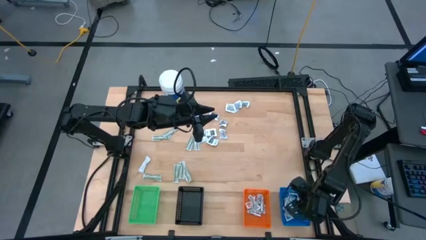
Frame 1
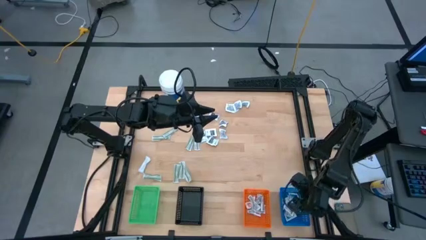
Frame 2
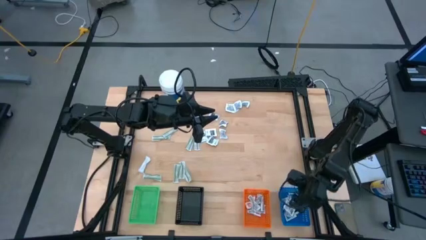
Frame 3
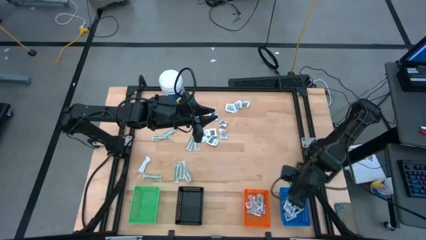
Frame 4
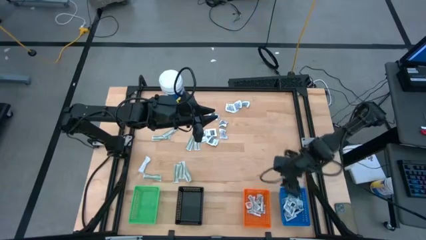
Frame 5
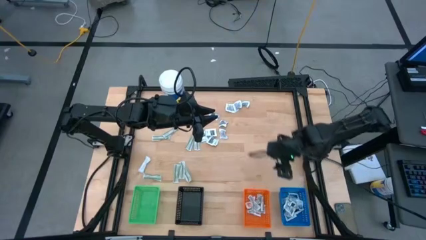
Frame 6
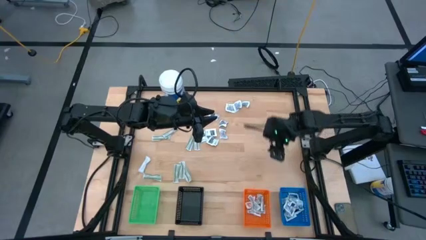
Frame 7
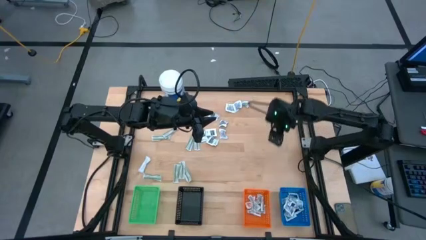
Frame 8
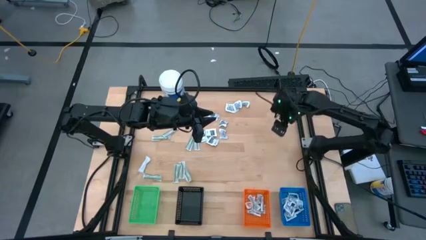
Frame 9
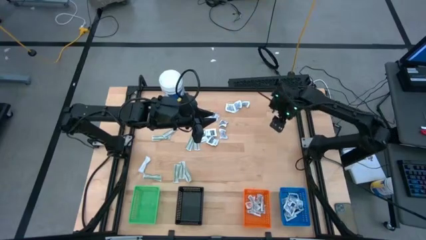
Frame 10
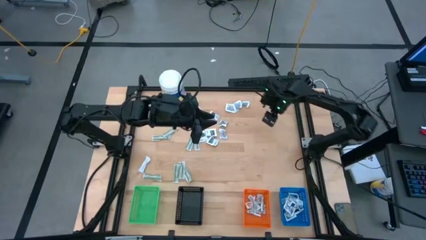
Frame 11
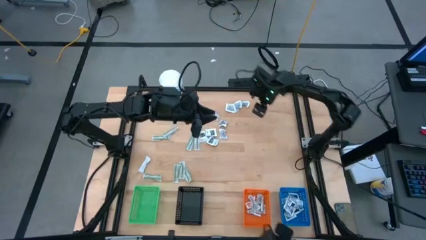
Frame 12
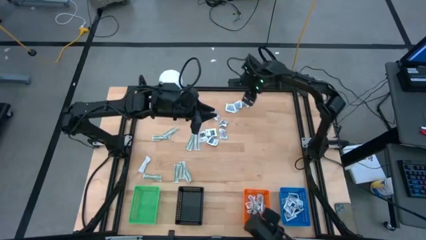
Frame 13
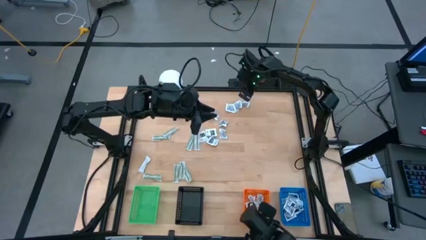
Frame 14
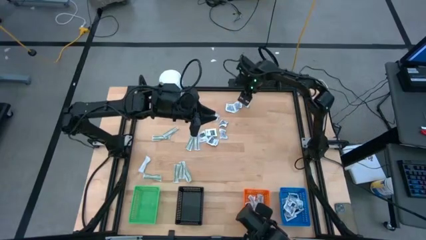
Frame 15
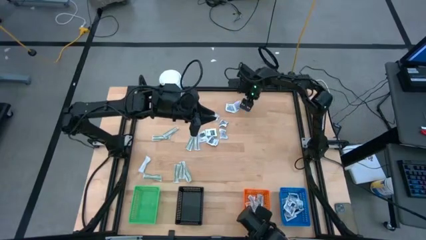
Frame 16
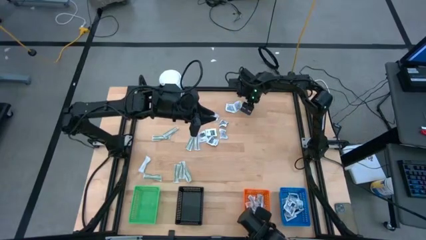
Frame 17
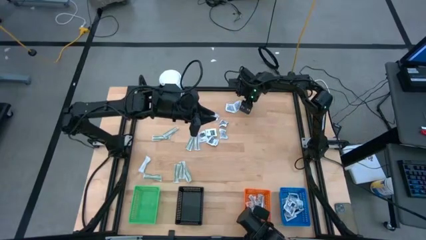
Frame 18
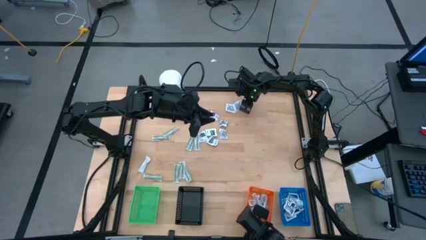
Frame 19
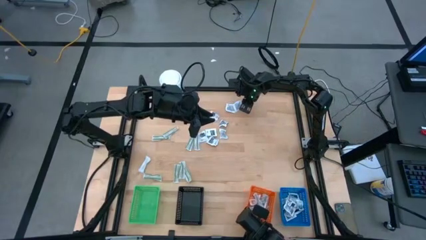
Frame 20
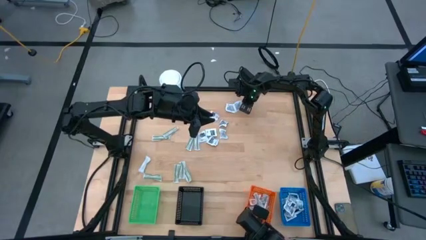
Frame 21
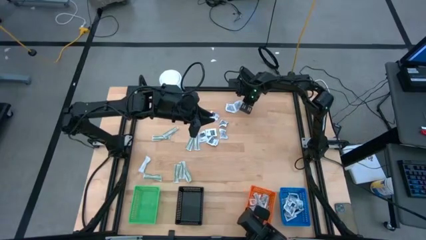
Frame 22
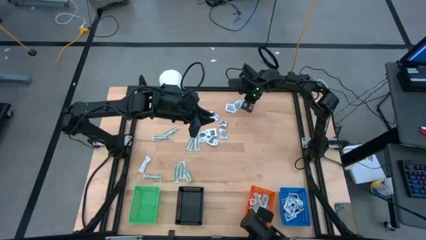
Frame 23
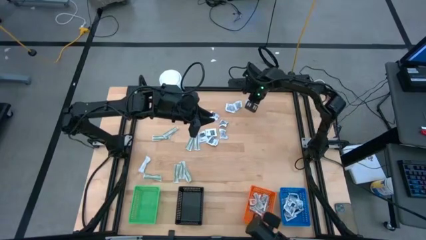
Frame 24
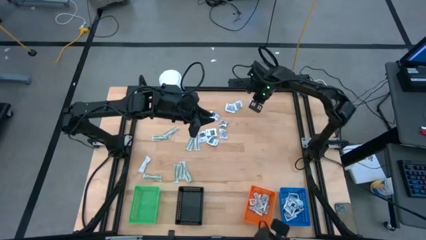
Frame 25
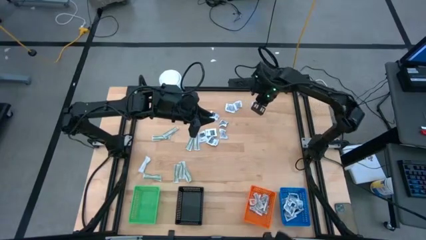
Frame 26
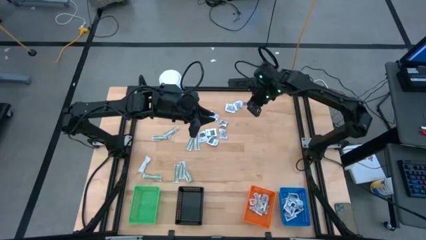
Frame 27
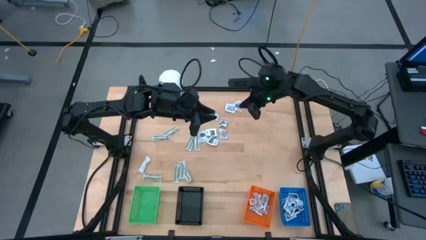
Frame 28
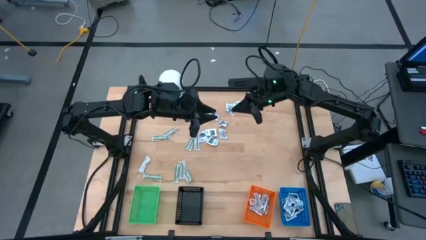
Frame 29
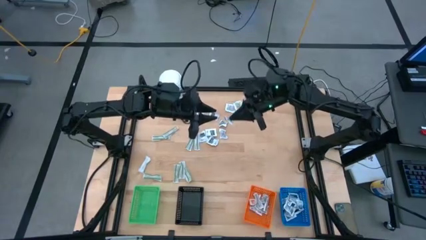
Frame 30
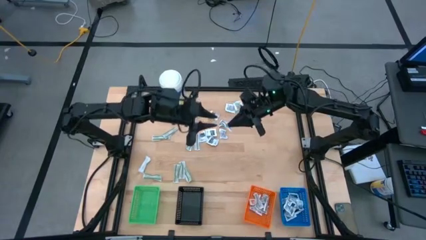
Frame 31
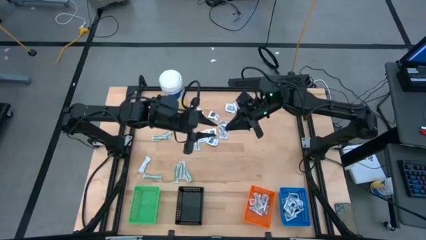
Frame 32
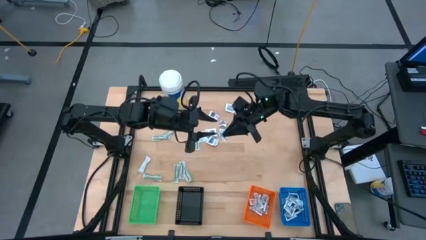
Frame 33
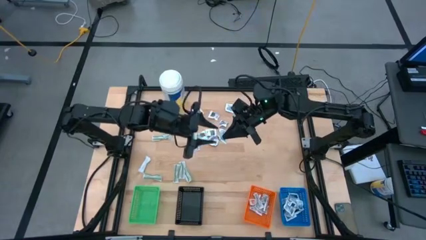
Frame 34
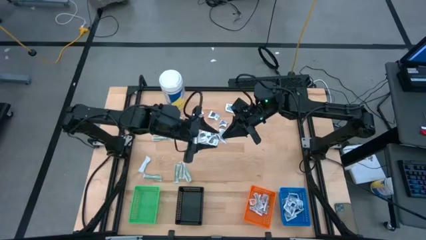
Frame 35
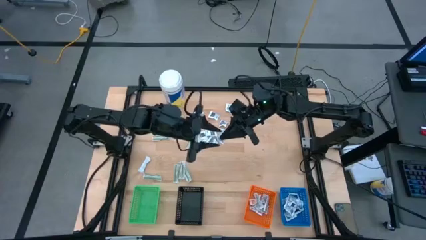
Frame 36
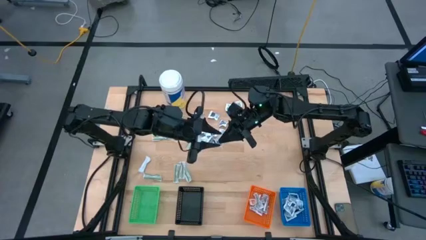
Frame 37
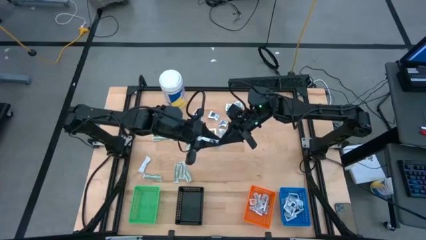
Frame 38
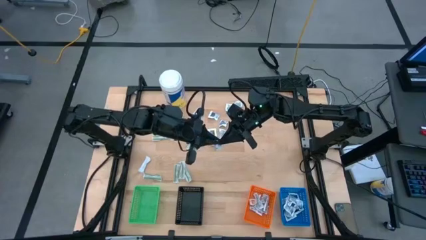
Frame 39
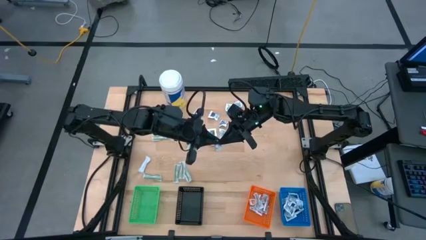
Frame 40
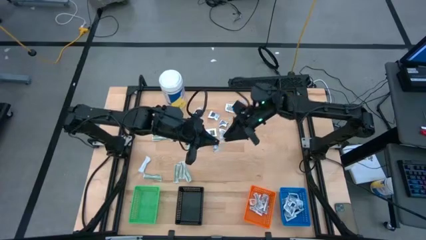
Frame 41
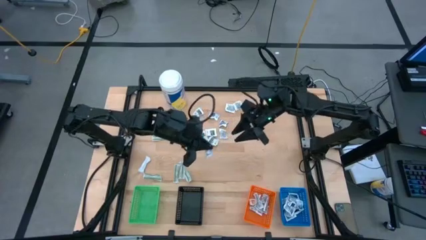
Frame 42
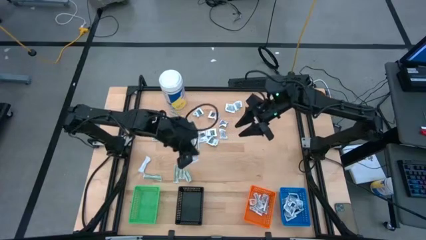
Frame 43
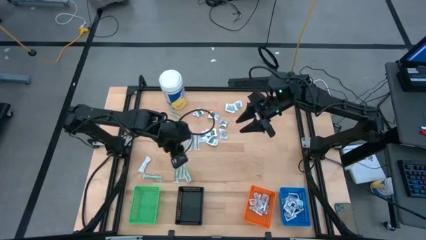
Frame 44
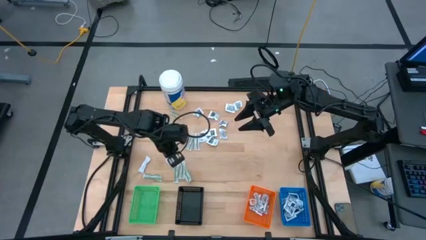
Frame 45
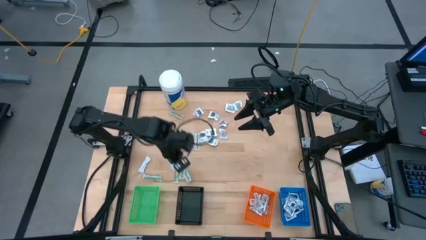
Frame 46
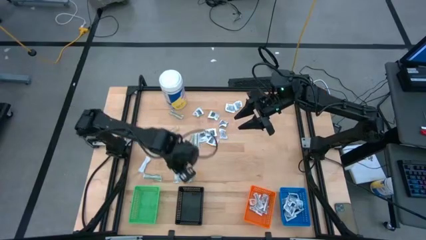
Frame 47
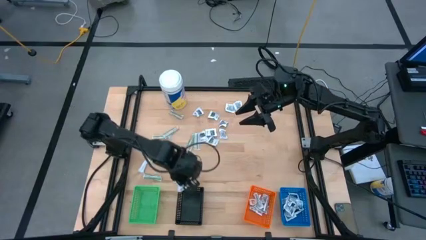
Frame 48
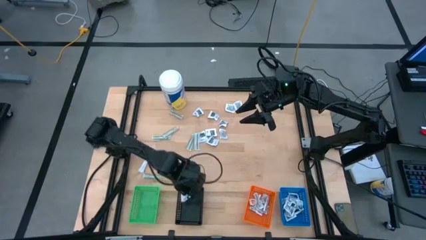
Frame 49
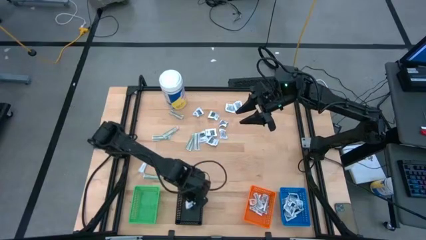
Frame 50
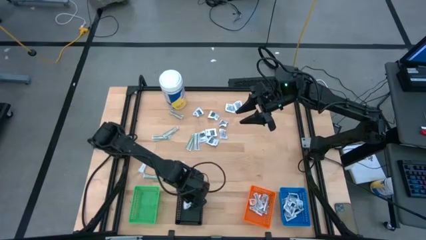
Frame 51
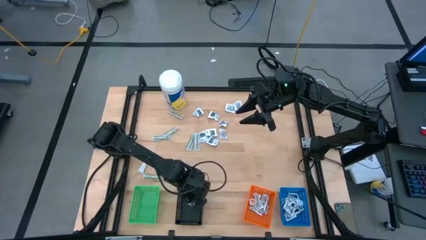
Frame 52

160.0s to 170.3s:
Task: Pick & Place First Aid Supplies
Put the towelette pack into the black bin

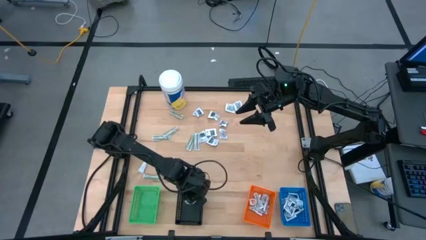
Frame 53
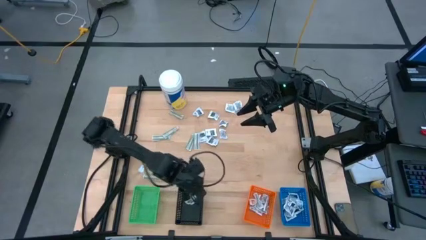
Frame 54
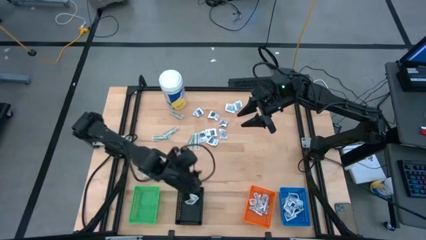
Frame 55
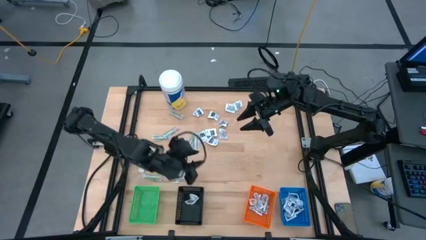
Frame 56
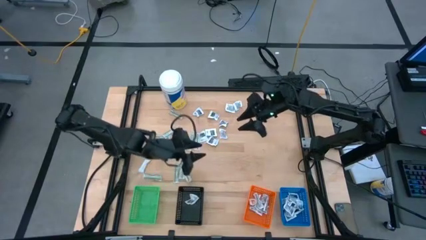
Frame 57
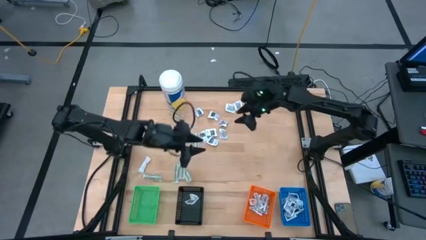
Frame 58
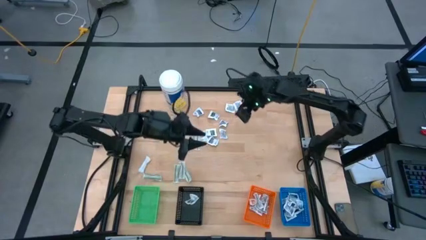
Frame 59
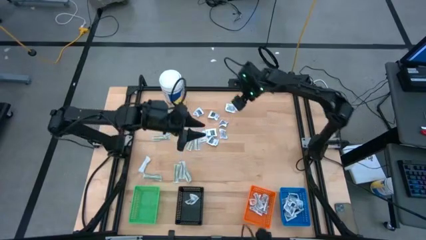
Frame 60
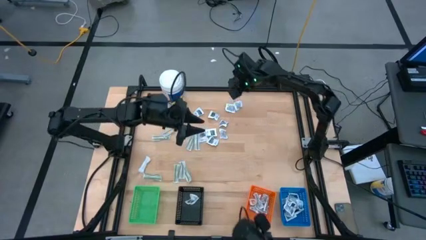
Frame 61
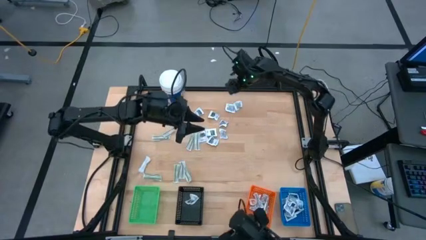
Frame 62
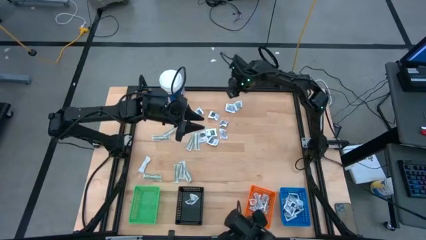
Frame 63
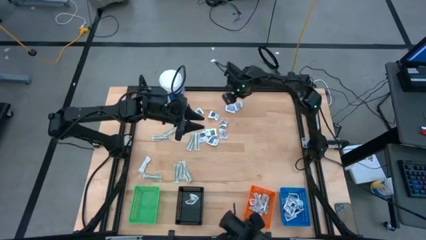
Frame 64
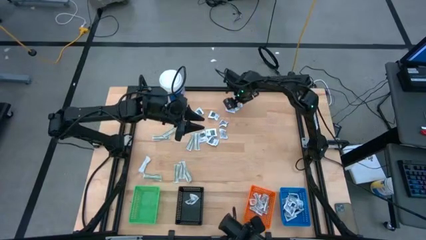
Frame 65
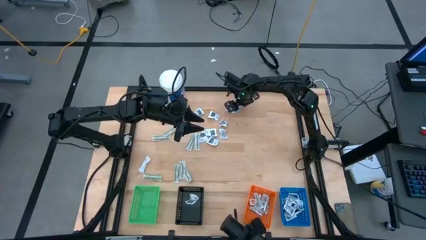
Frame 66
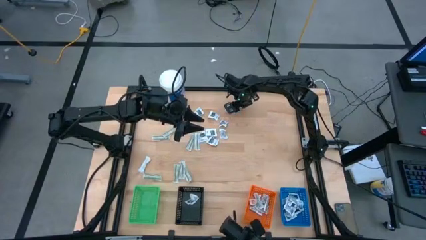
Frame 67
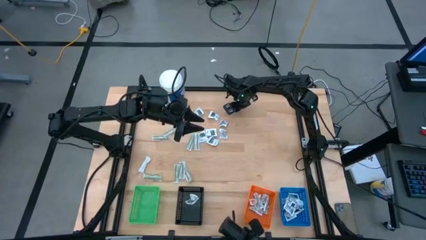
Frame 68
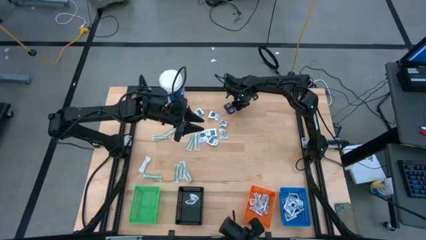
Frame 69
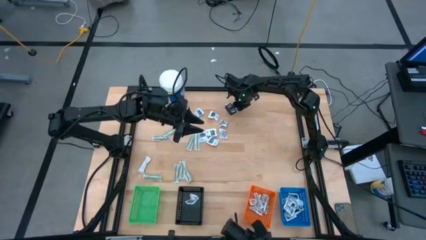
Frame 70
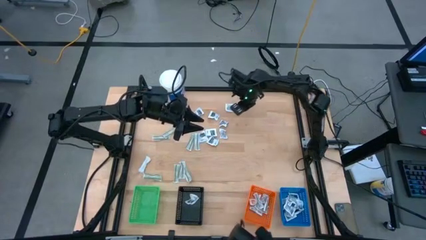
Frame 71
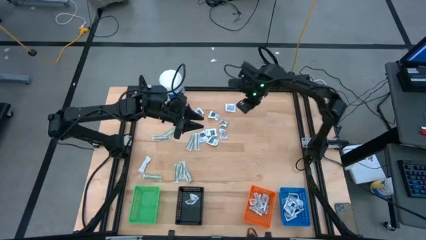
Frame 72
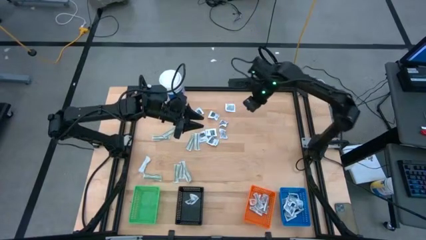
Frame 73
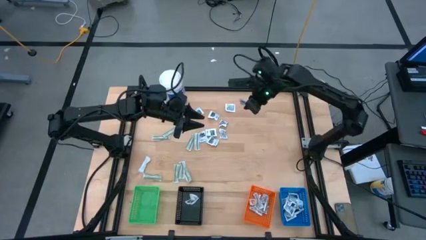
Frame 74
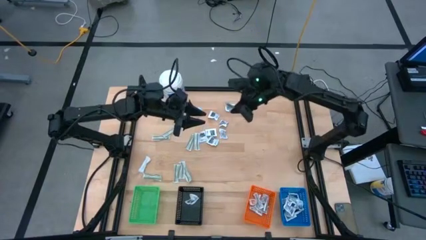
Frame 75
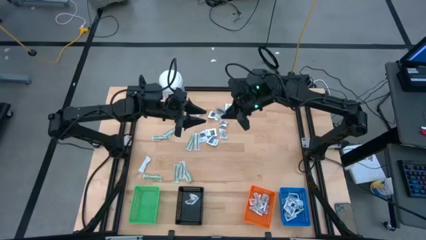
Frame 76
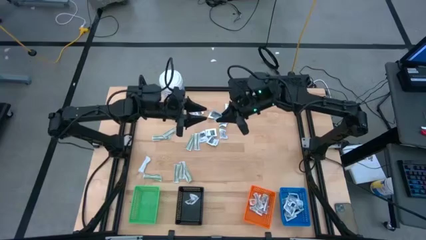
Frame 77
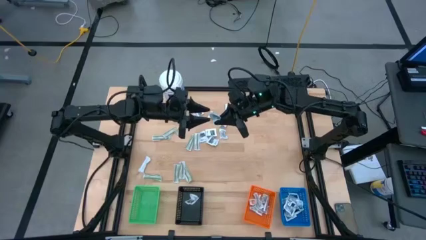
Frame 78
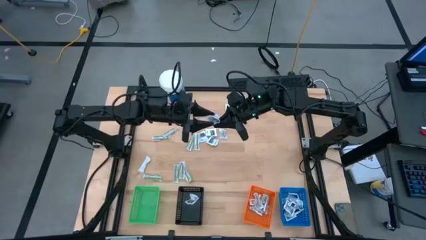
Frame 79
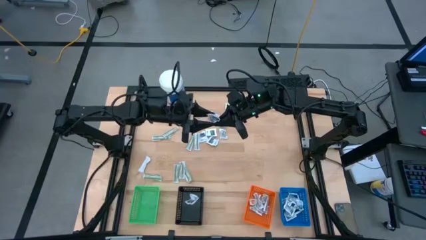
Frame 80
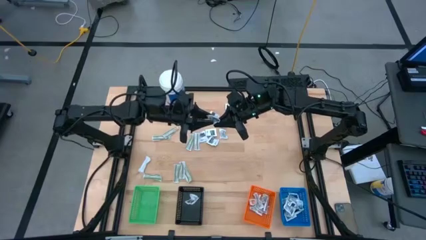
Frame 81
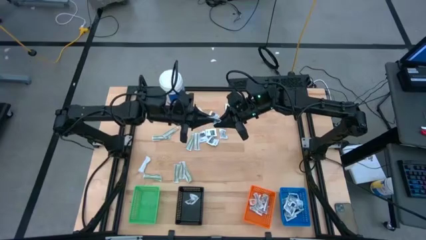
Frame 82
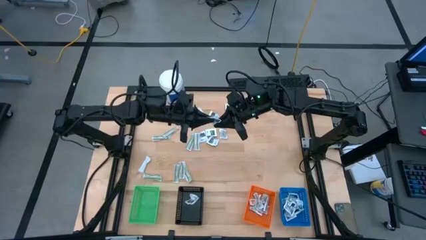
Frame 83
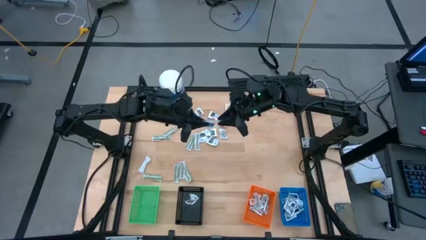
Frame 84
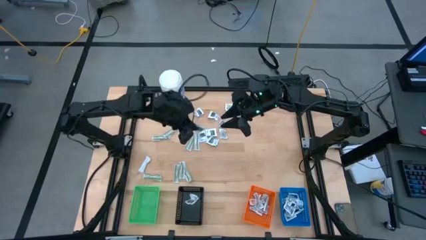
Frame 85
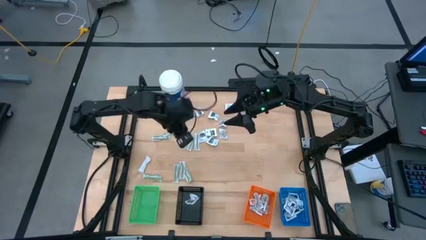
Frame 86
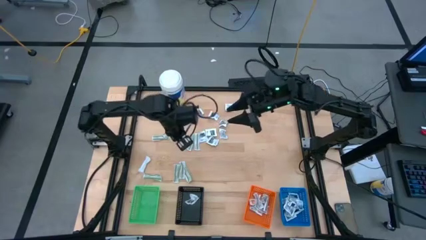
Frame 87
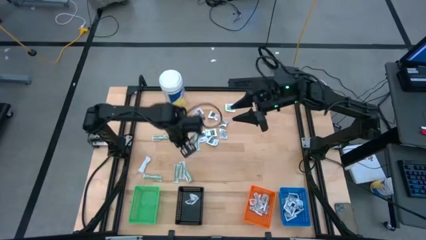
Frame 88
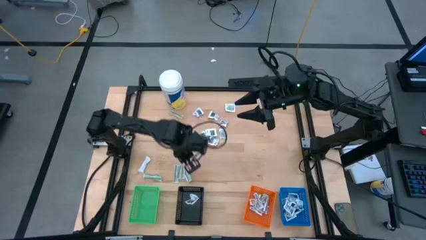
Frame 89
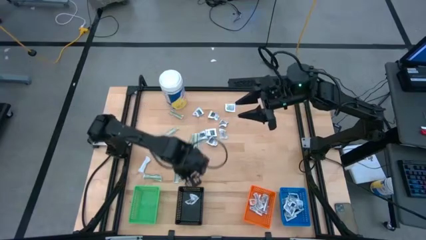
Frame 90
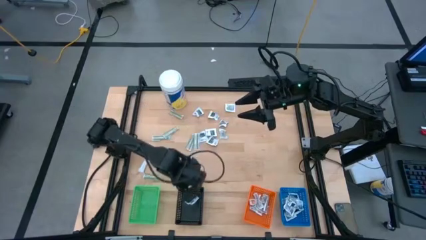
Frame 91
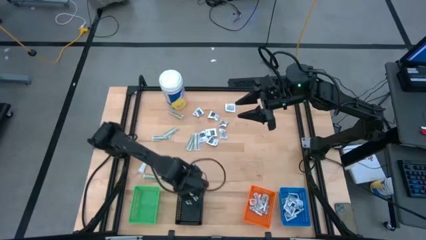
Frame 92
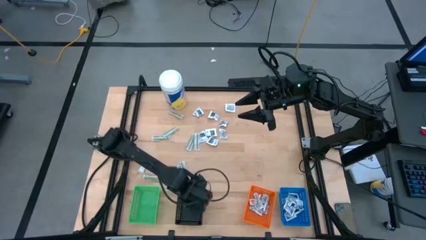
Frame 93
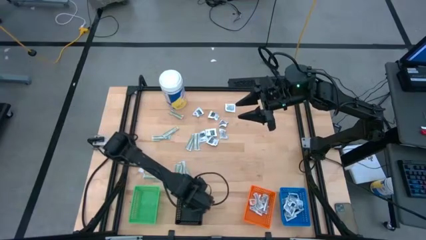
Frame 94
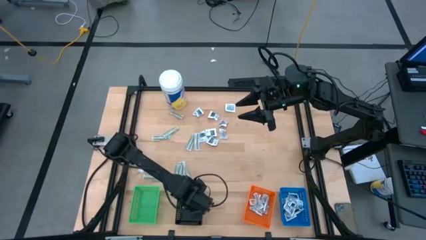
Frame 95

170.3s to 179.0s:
Put the towelette pack into the black bin
